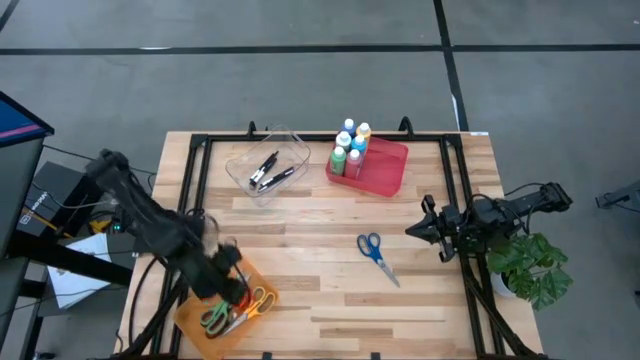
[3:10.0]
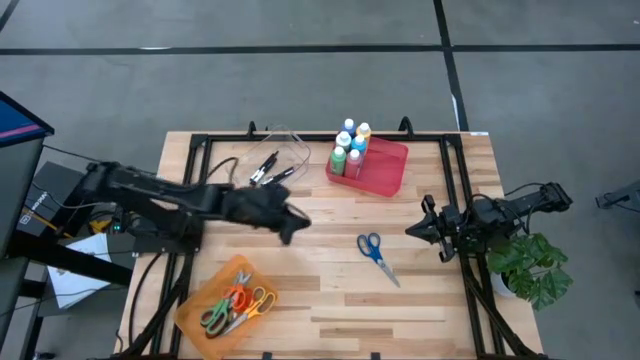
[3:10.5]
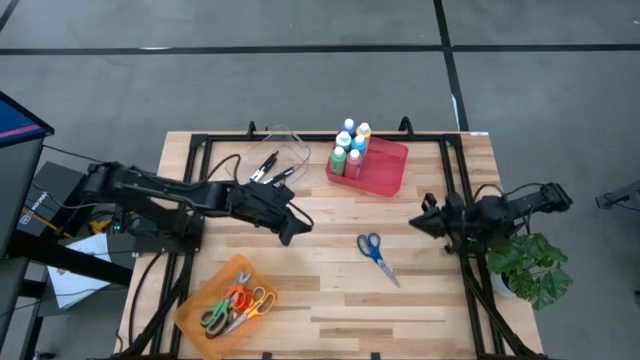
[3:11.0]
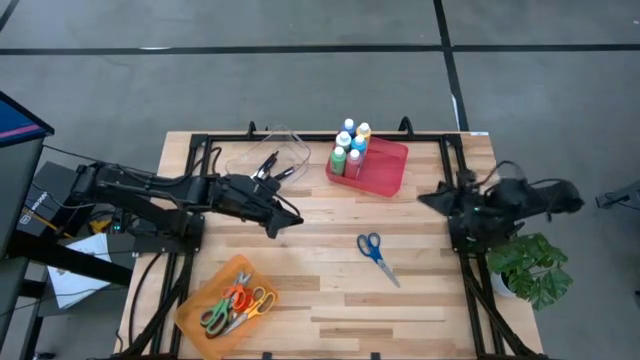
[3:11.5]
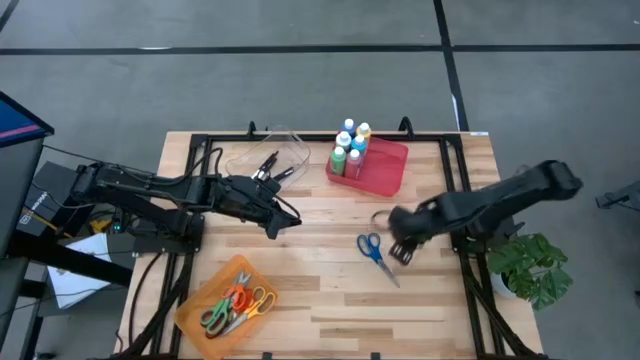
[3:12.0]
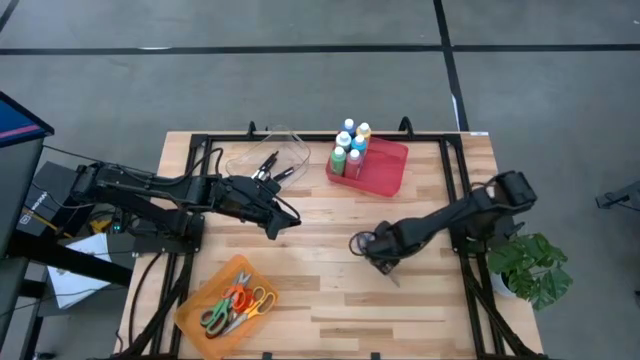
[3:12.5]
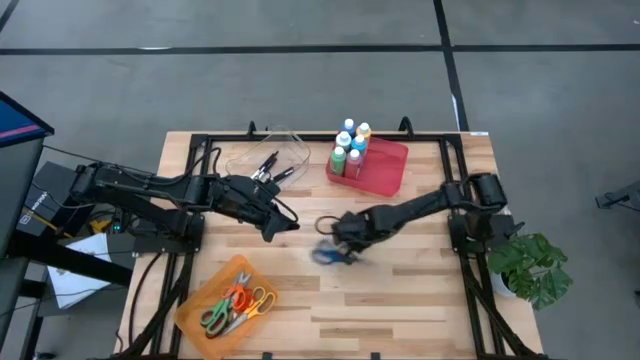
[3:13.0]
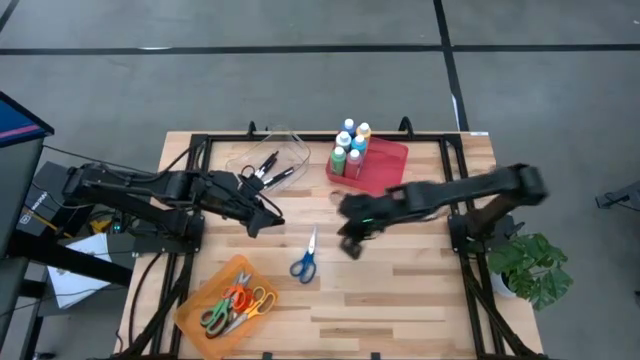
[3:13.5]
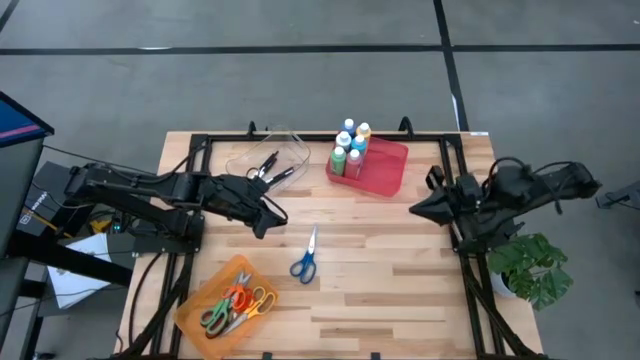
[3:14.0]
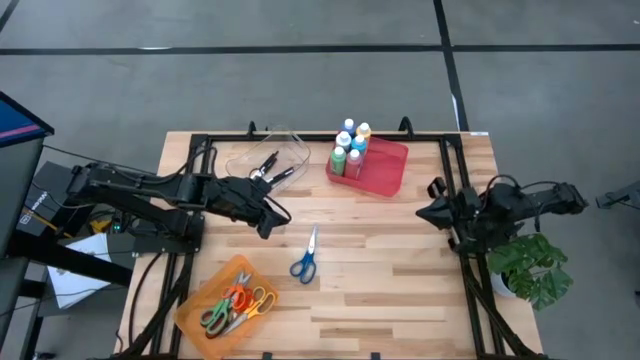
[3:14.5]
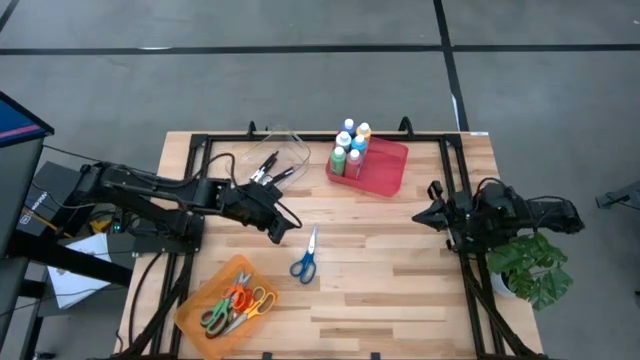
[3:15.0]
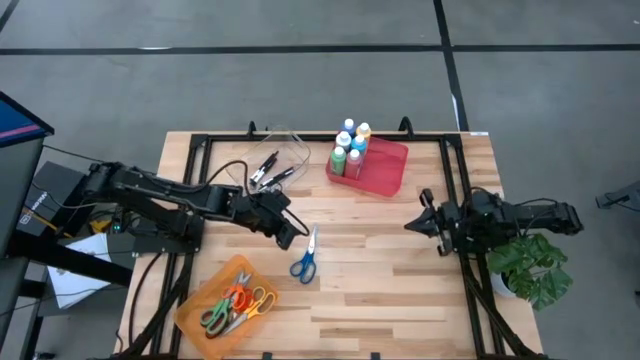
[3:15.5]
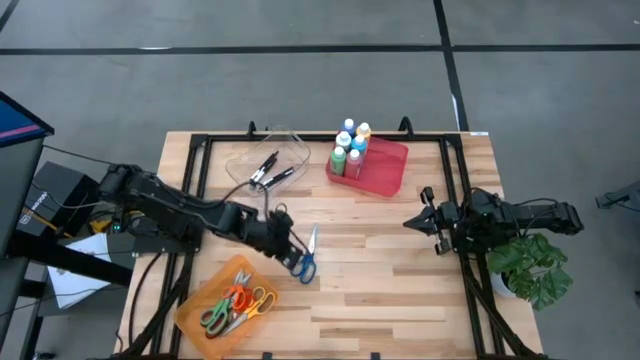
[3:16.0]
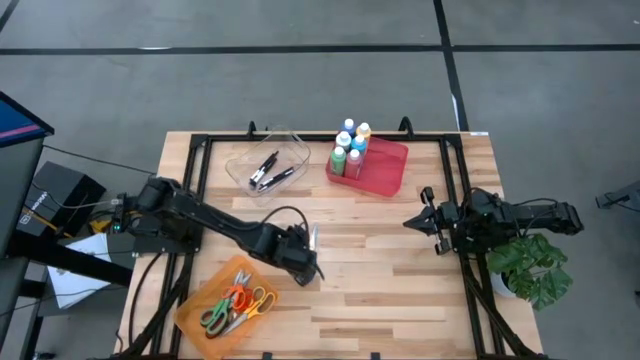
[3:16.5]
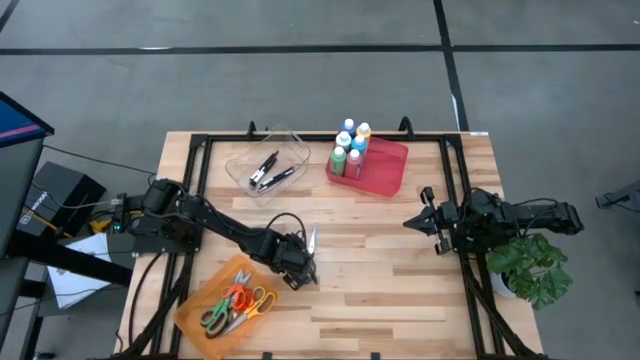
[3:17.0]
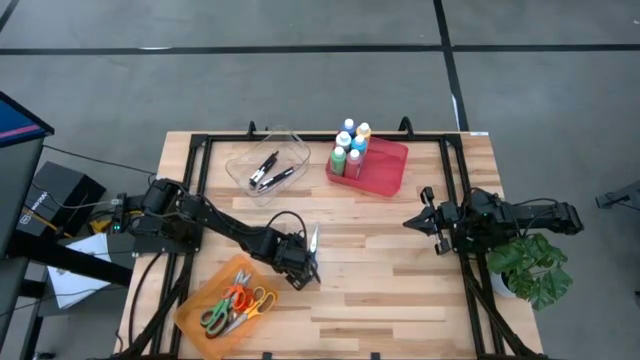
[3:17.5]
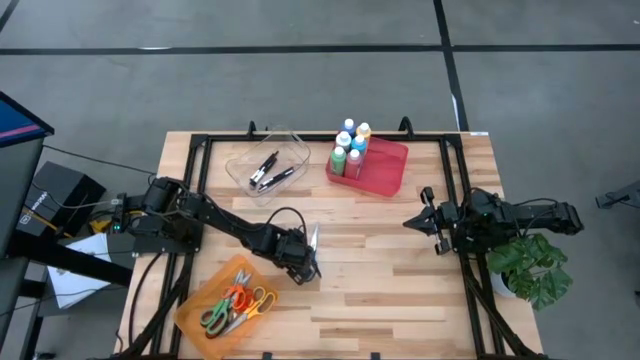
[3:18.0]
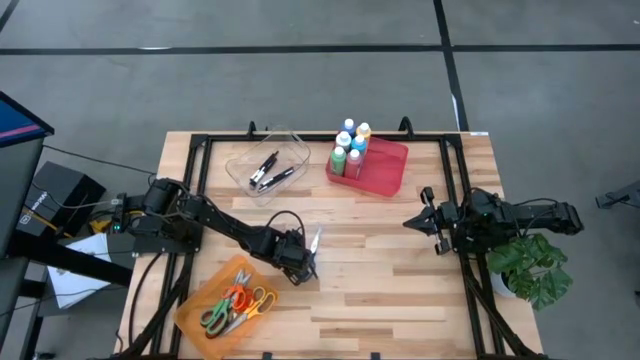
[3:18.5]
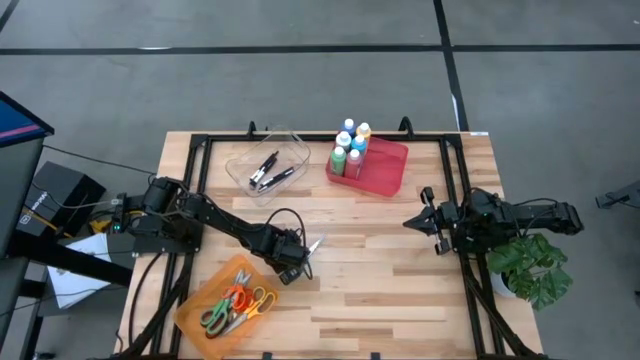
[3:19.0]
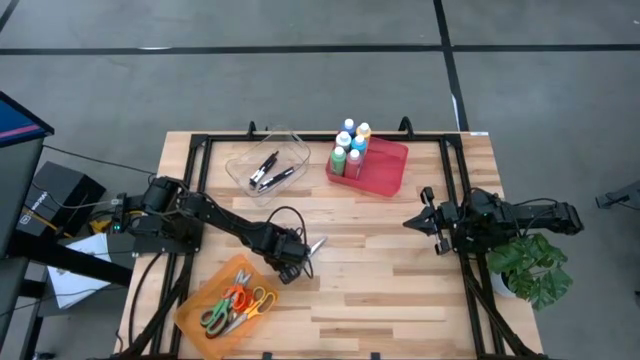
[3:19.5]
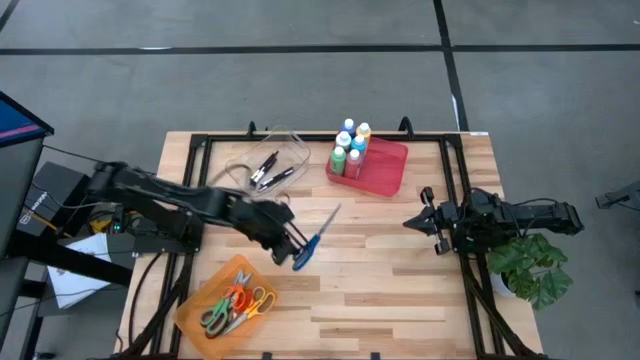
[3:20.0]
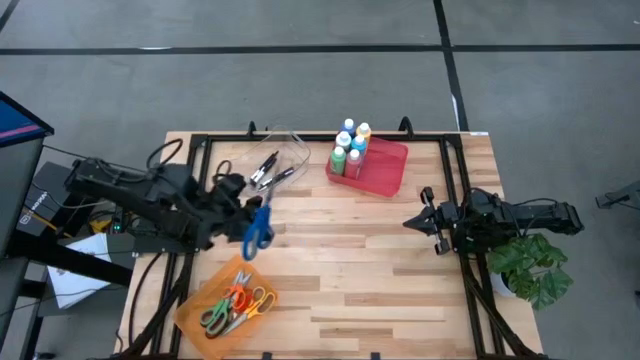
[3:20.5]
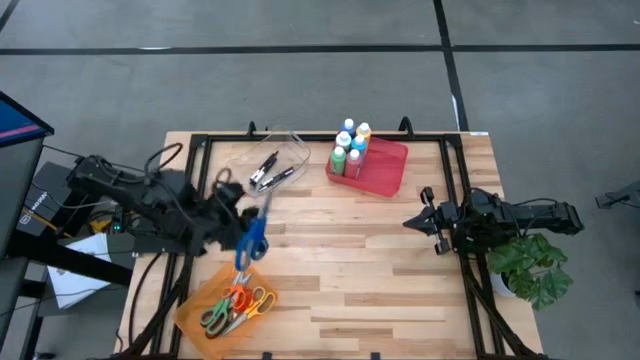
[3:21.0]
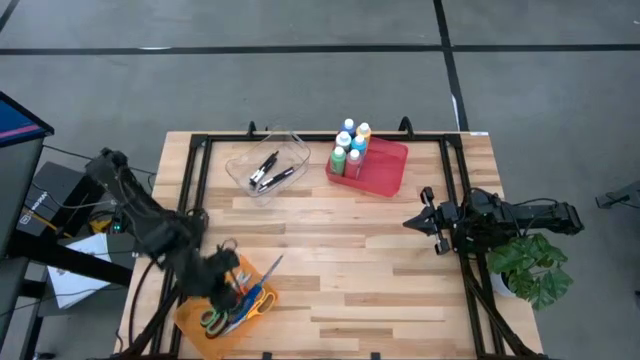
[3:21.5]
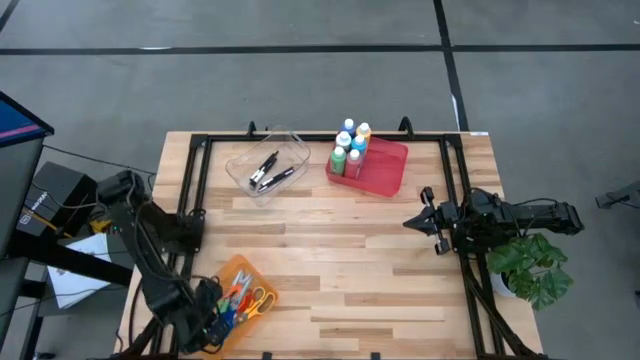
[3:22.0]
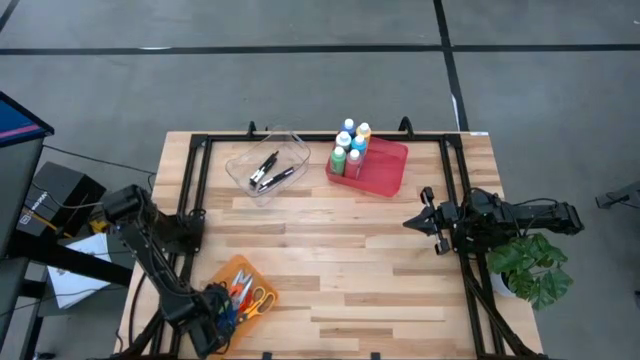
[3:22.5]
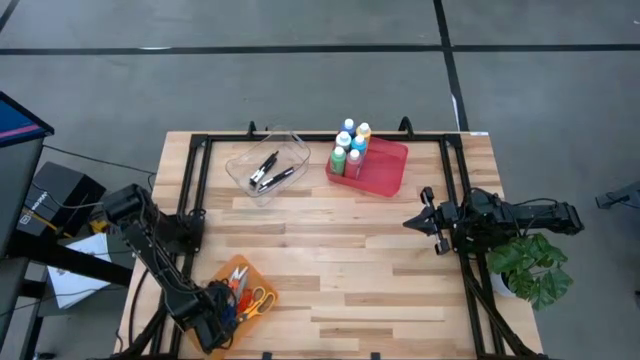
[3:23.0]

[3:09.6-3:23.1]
Task: Pick & Place Paint Supplies
Put the blue scissors into the orange bin

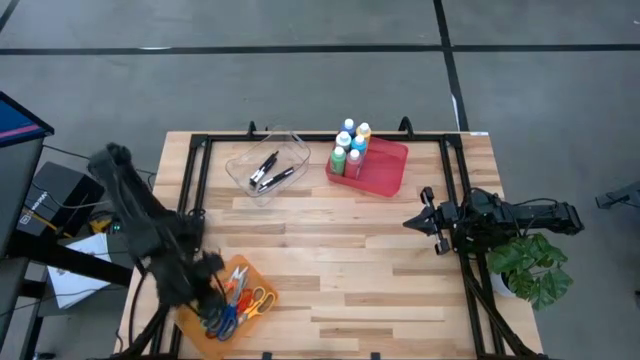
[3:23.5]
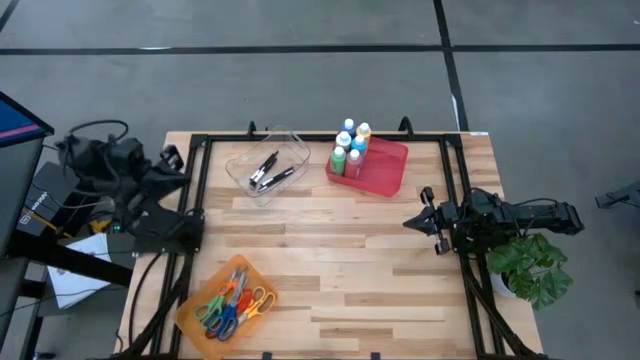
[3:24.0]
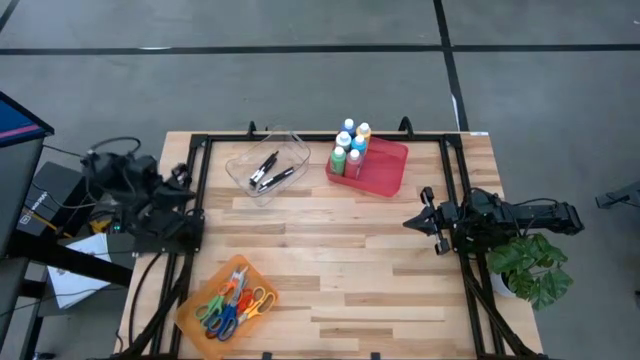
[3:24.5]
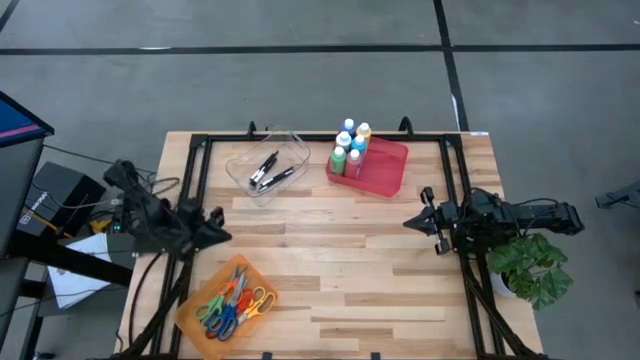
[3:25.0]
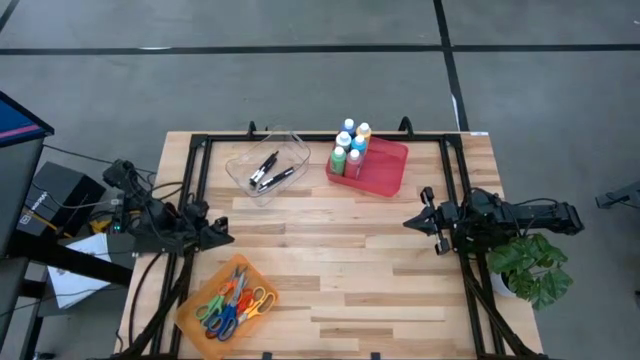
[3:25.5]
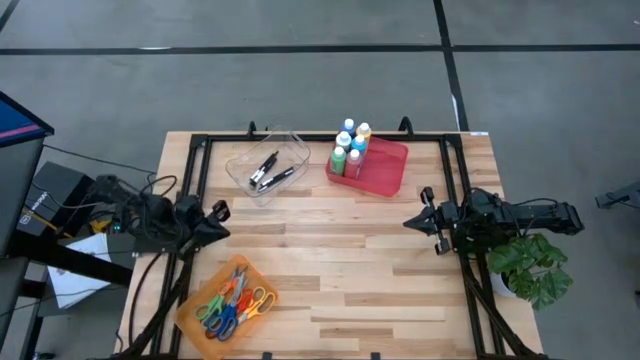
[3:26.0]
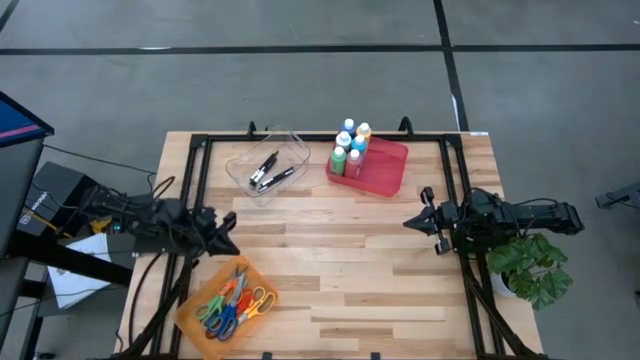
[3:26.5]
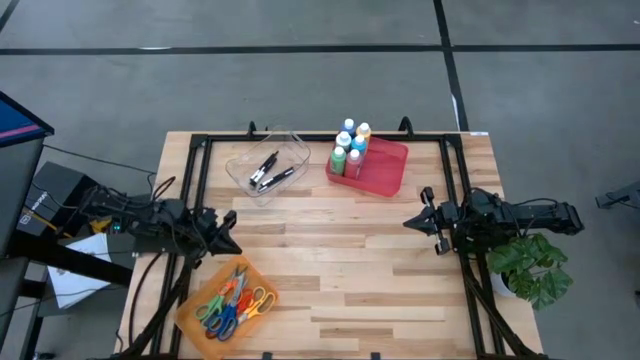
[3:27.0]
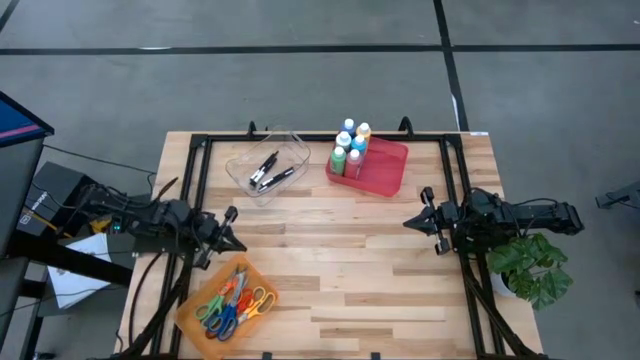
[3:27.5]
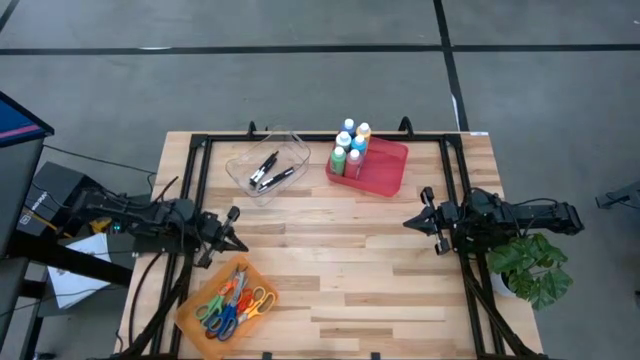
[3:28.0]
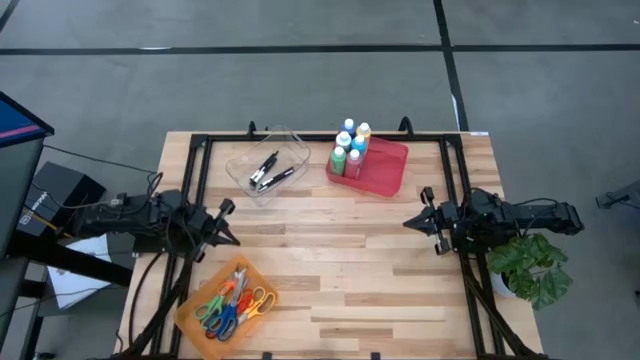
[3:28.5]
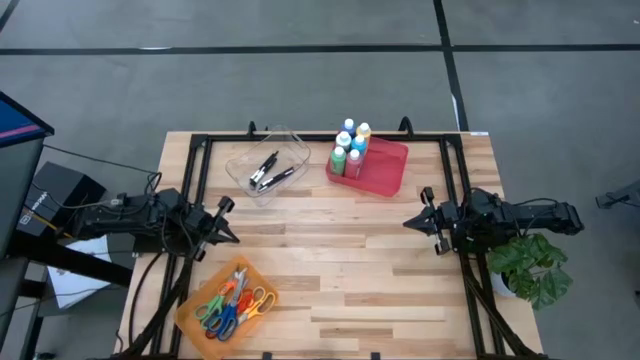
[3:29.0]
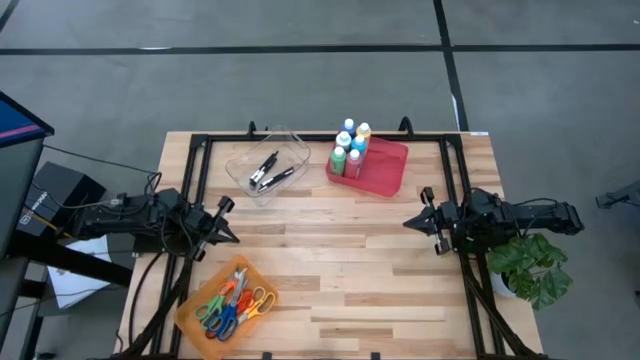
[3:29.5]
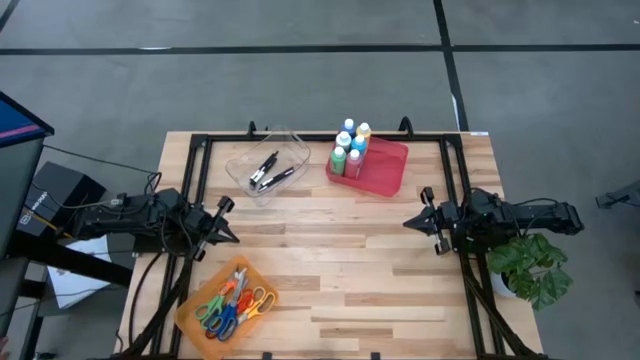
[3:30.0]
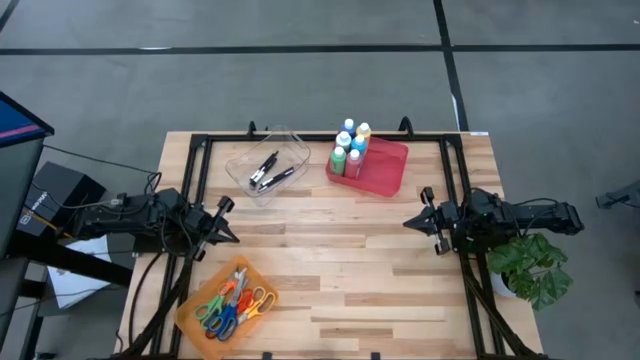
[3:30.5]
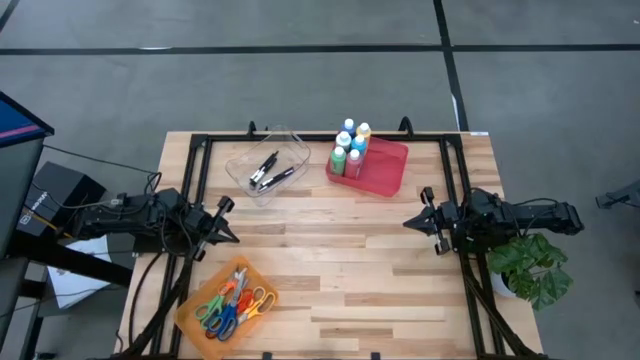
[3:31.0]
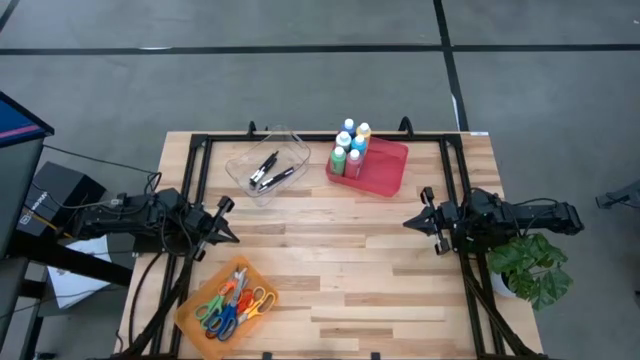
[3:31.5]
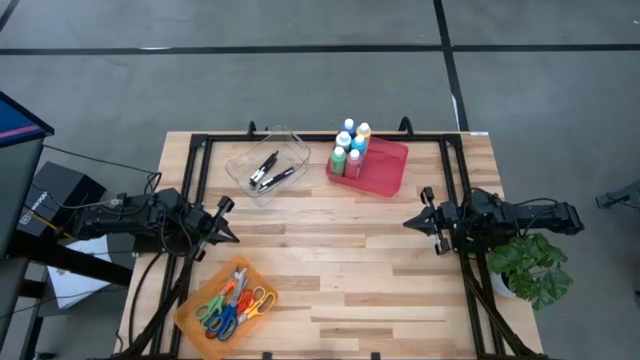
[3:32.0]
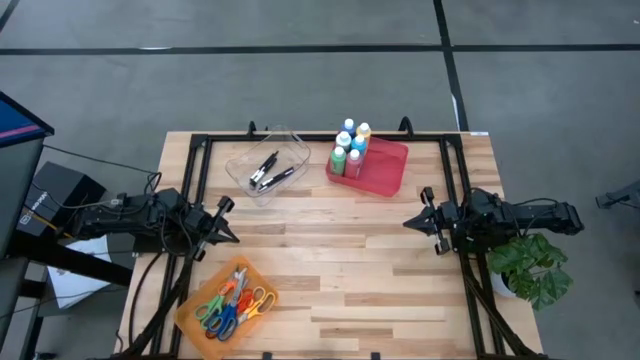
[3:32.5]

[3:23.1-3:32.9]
Return to Home Position
